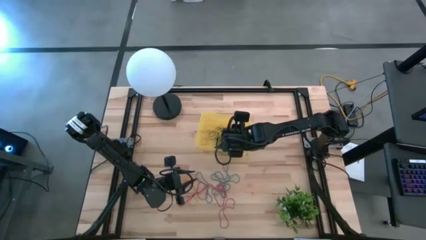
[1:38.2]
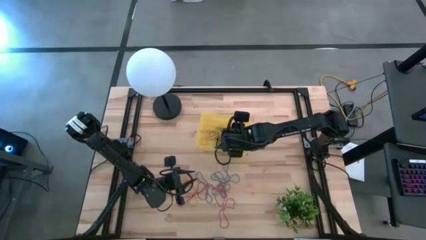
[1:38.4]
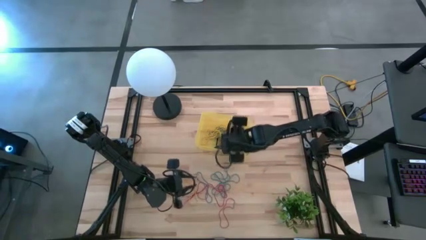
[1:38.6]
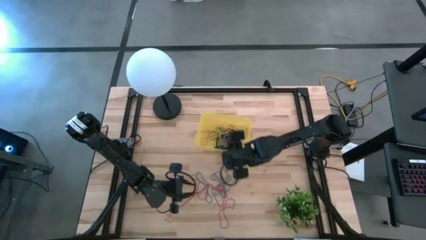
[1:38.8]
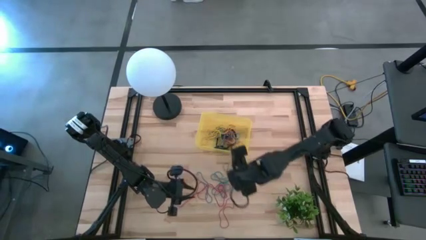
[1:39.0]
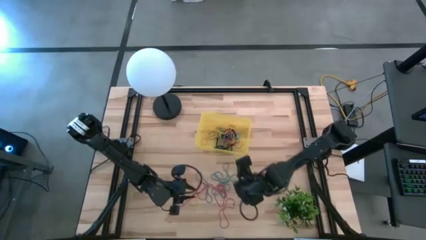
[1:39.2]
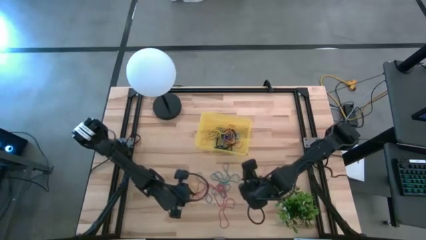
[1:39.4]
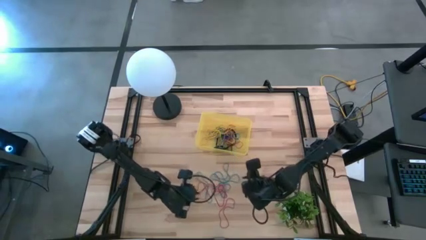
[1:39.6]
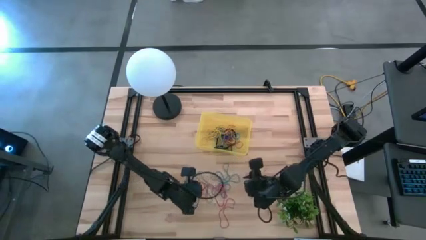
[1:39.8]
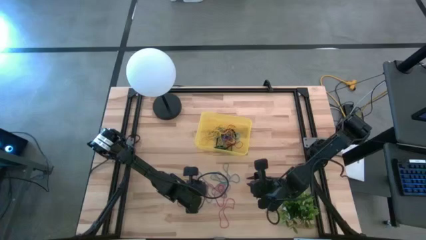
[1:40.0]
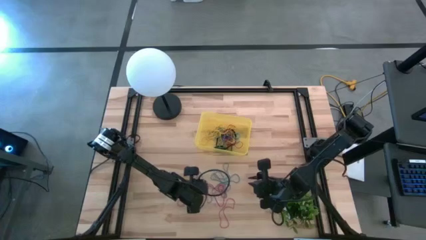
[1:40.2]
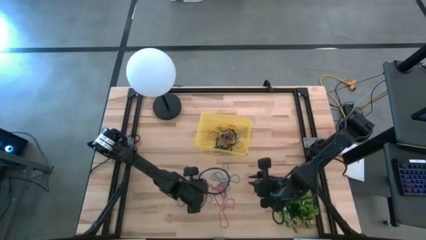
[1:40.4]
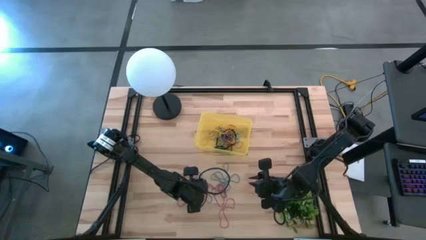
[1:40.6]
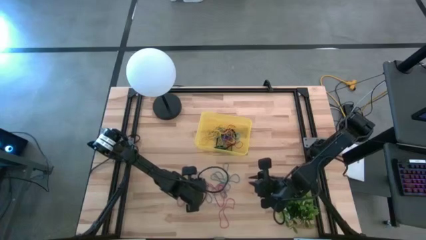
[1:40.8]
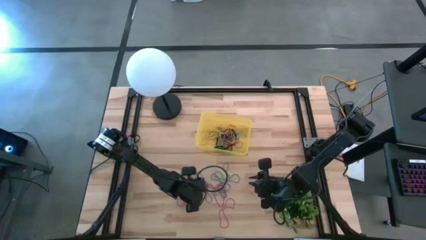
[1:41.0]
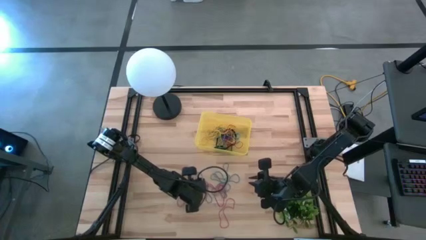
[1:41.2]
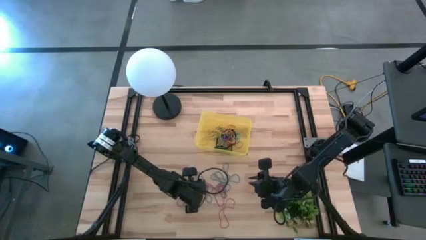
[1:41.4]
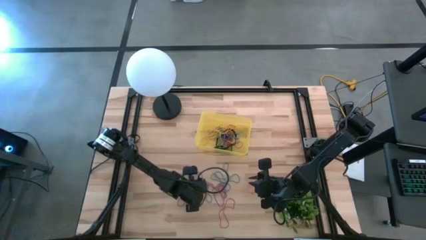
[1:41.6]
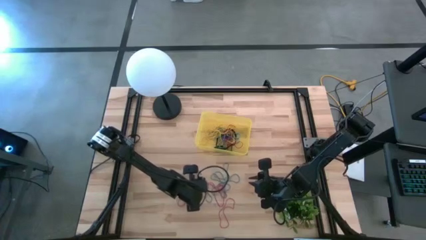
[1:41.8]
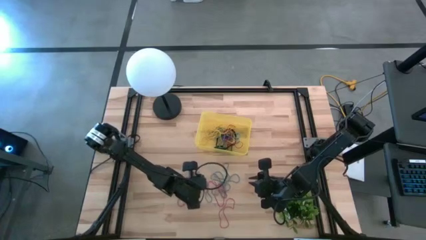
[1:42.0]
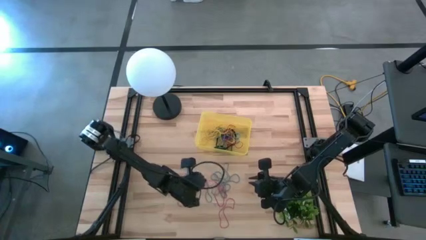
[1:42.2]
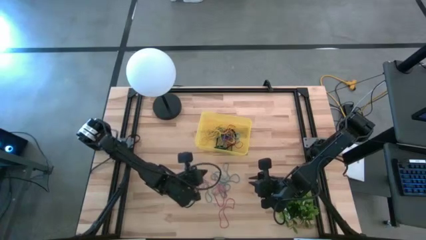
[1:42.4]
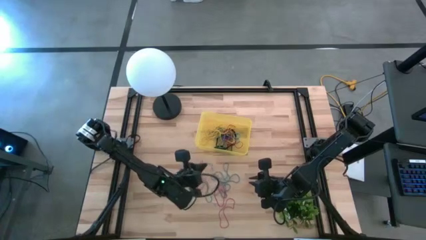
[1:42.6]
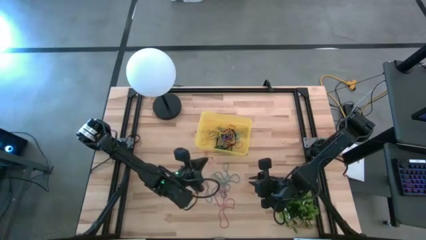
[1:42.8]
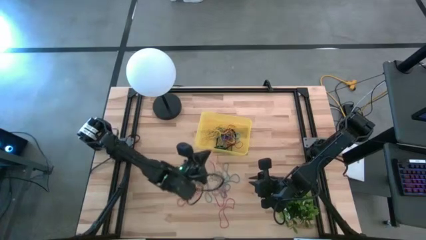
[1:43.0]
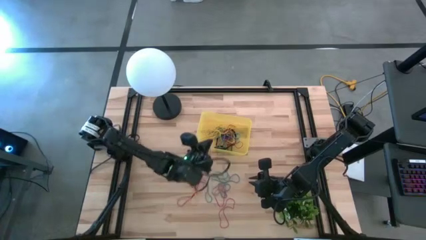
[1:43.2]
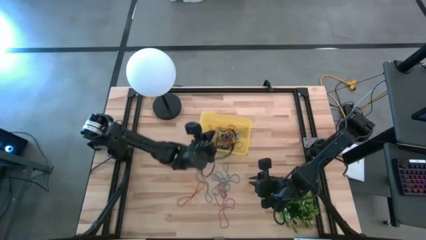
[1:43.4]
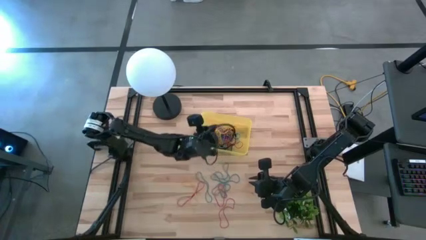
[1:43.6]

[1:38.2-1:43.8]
Task: Pick and place rubber bands into bin
Put the red rubber band into the yellow bin

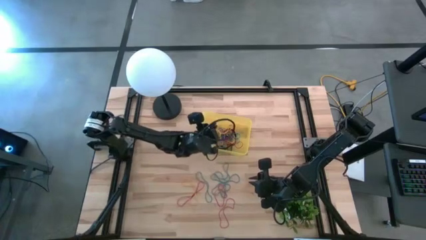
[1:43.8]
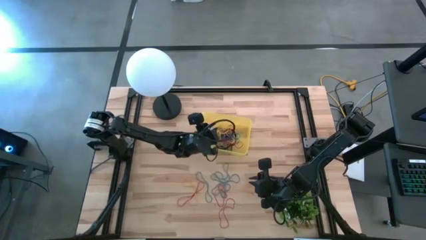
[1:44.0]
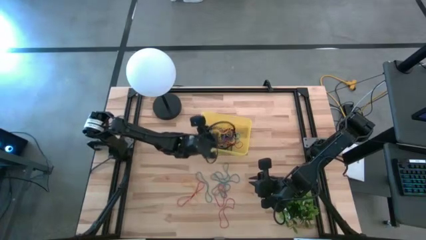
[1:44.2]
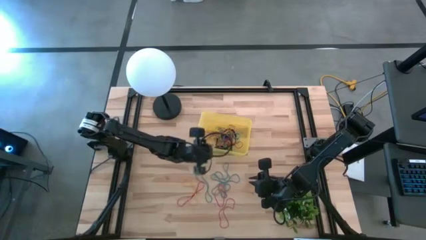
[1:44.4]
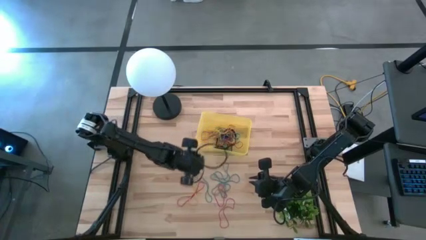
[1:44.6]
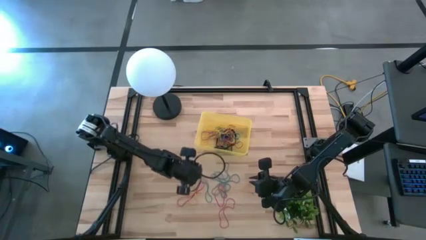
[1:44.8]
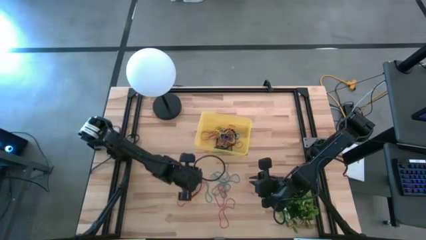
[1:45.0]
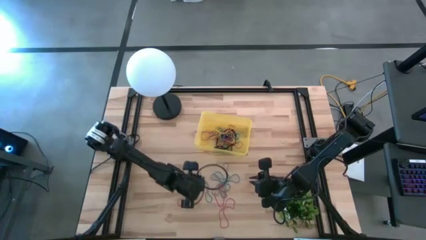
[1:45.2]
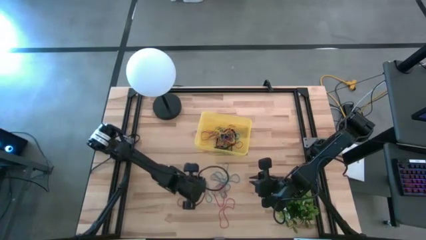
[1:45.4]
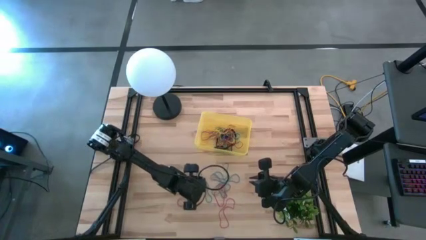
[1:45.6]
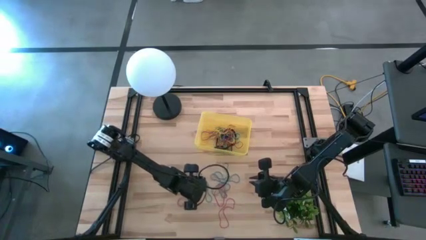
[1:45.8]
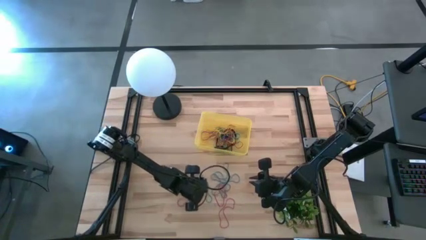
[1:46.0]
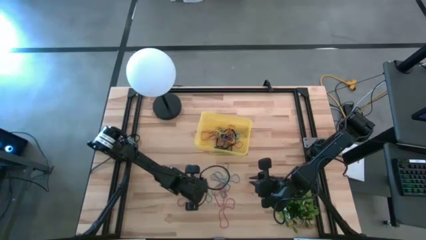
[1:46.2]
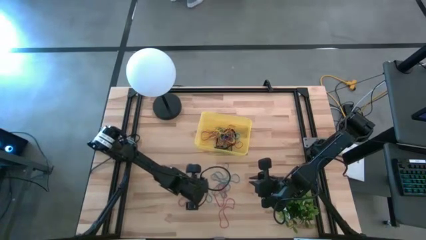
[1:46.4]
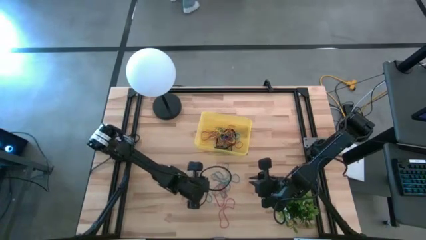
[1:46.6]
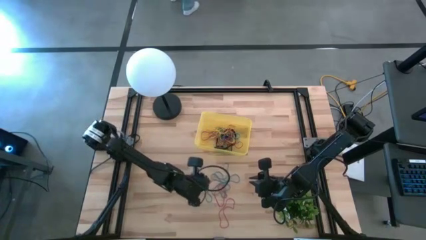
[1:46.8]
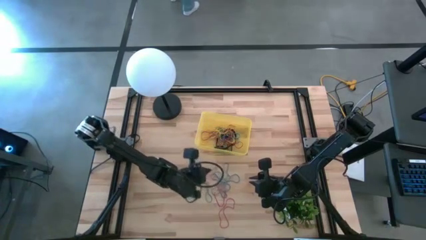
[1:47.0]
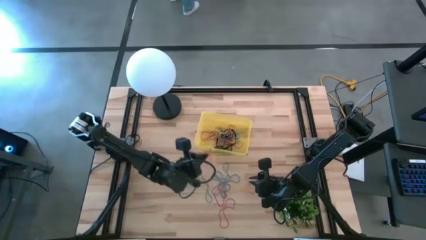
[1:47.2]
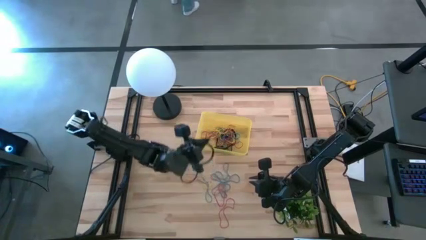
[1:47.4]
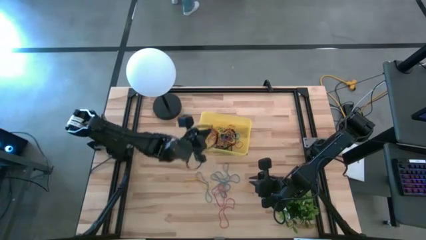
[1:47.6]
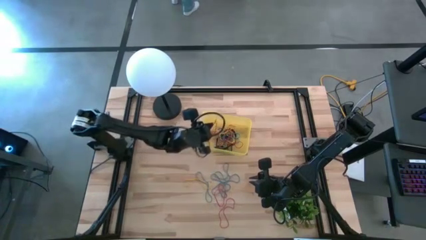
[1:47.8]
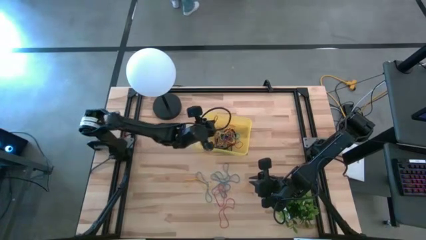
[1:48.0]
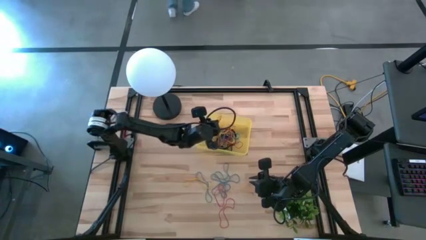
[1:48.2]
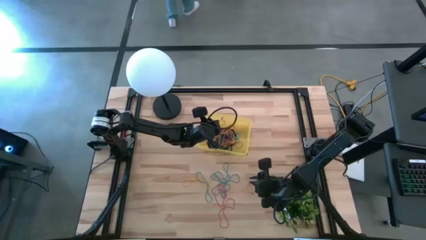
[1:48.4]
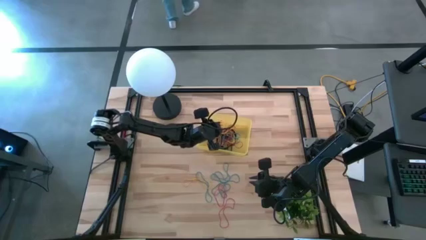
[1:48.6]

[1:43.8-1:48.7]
Put the red rubber band into the yellow bin

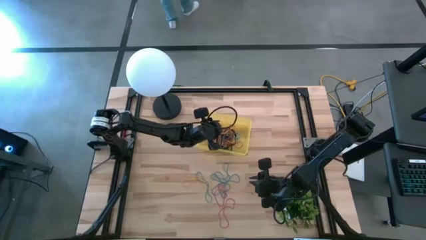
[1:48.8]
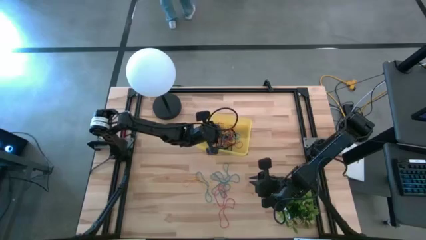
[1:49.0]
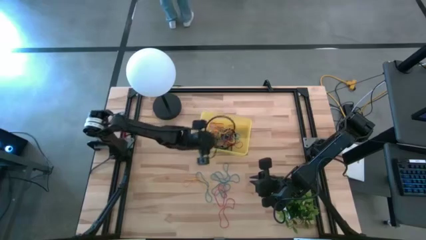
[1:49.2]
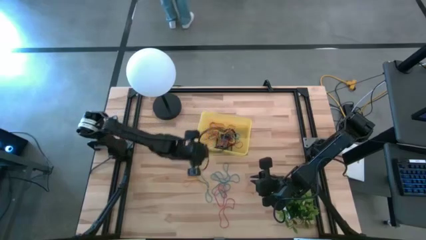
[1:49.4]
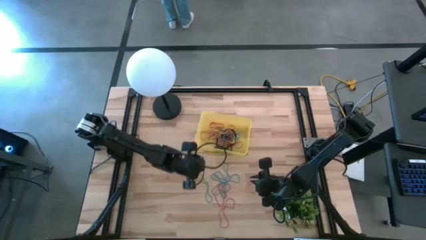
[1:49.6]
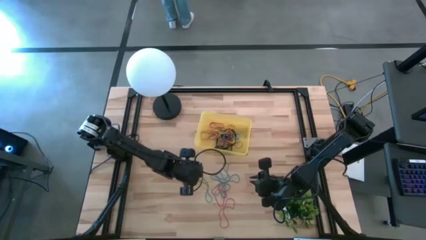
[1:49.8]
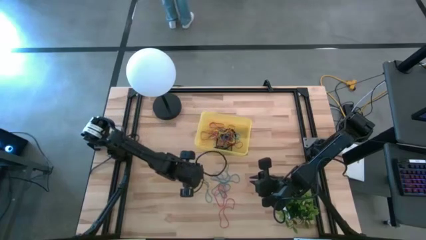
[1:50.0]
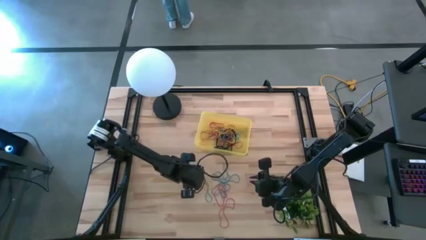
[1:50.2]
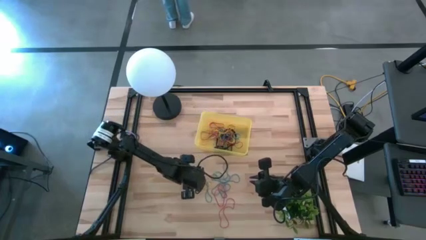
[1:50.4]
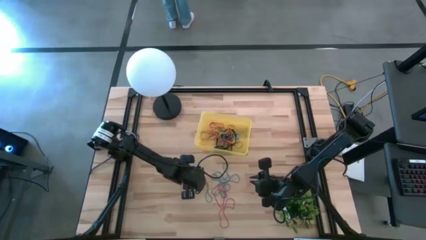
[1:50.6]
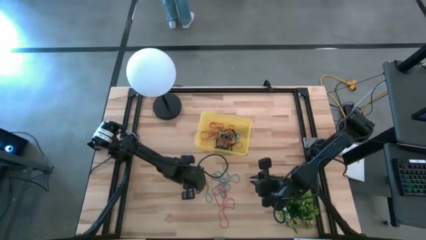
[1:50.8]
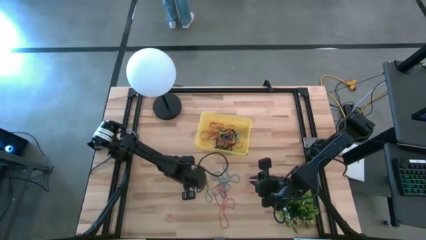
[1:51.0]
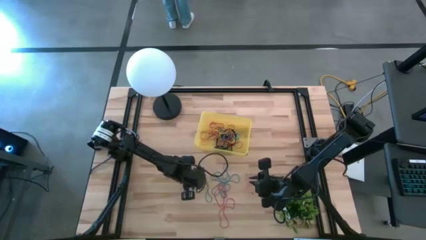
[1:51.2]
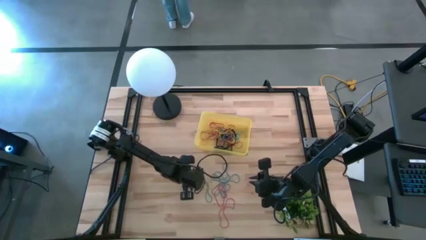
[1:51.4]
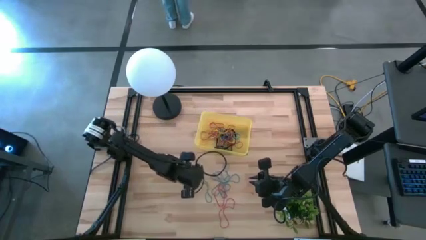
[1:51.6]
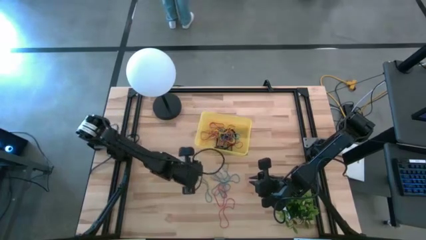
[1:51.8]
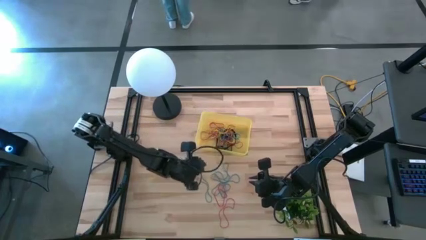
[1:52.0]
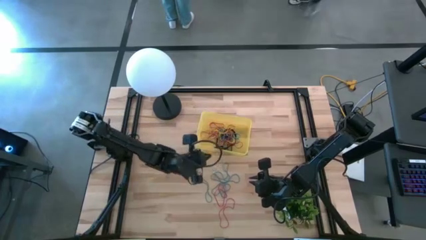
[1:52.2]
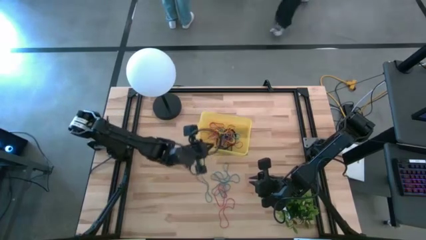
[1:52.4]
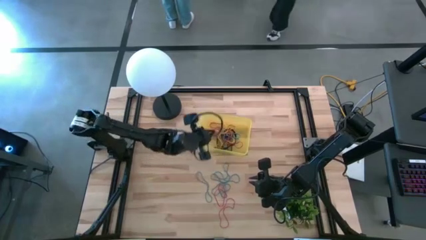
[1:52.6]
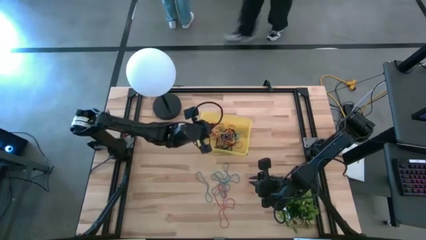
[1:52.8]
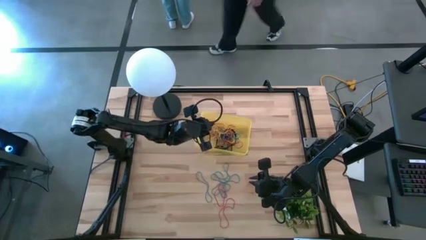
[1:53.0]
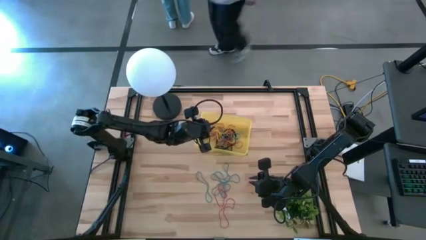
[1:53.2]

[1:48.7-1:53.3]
Put the yellow rubber band into the yellow bin

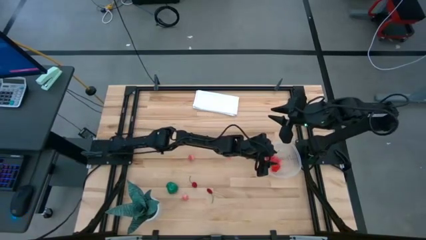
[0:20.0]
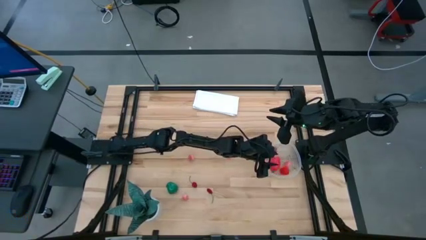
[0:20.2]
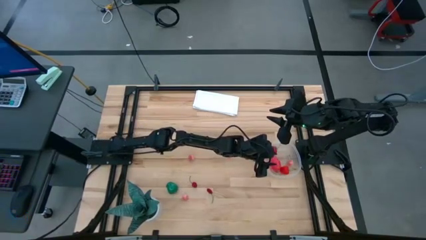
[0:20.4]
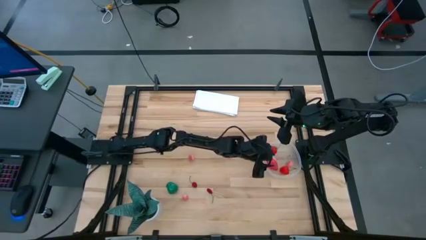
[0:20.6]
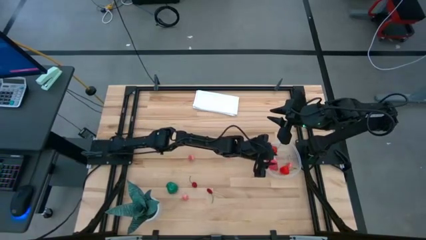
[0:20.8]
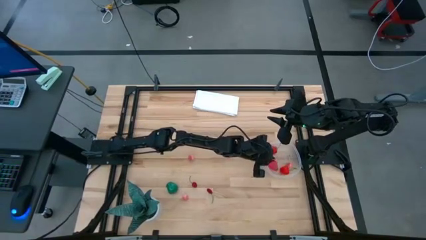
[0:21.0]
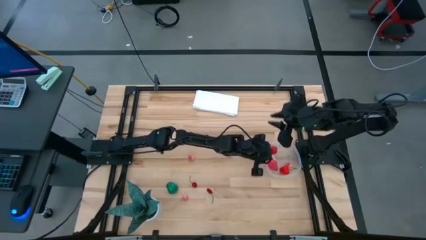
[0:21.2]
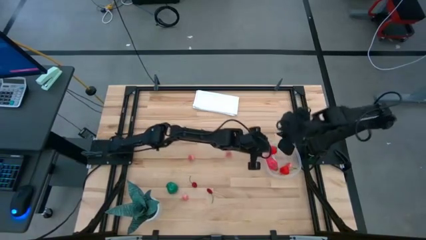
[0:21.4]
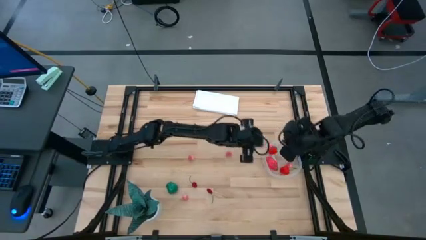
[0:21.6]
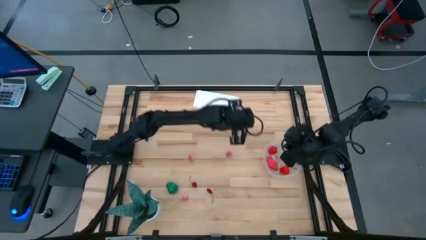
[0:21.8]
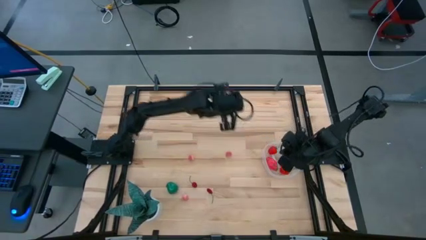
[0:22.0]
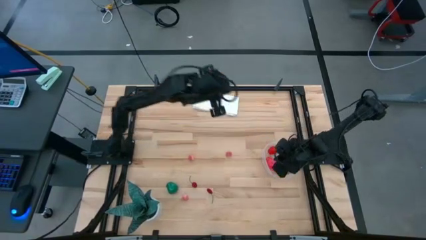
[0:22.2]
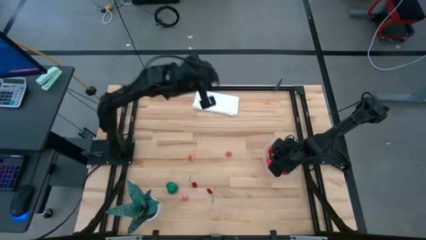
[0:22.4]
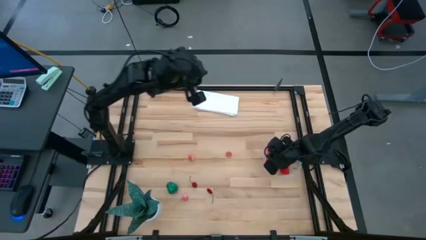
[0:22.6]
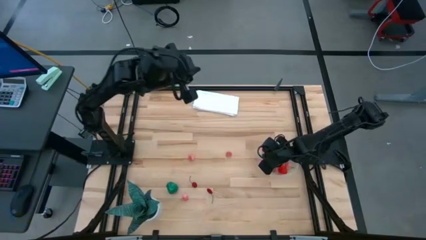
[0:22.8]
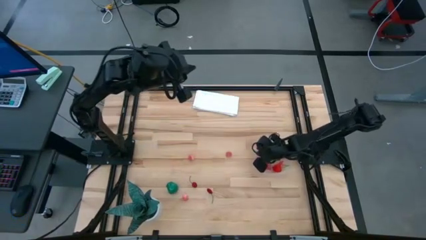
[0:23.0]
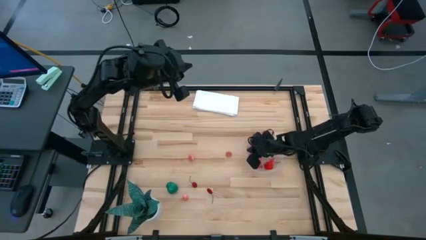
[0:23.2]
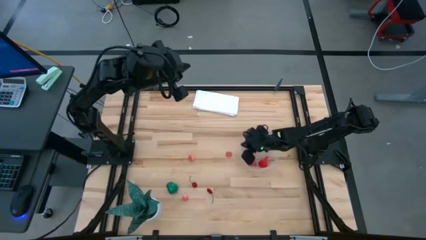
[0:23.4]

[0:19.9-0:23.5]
Task: Pick and placing Produce into tupperware
Adjust the transparent bin
